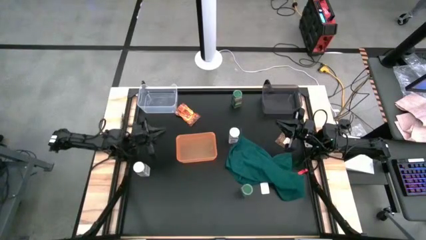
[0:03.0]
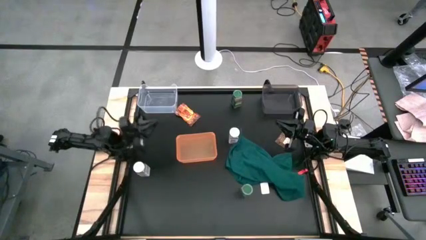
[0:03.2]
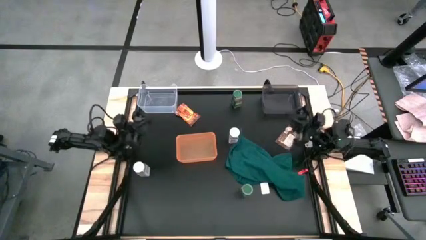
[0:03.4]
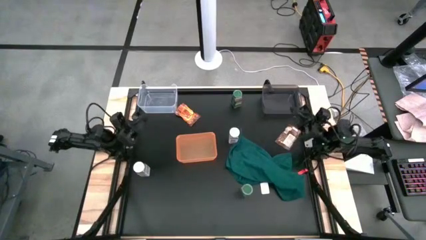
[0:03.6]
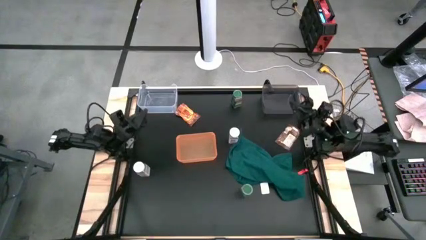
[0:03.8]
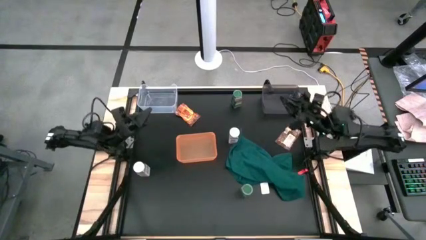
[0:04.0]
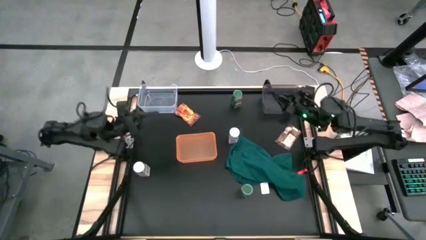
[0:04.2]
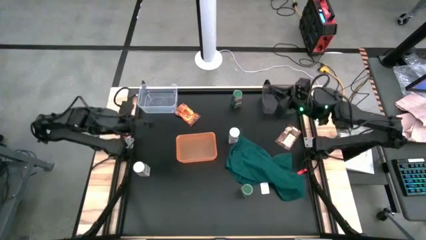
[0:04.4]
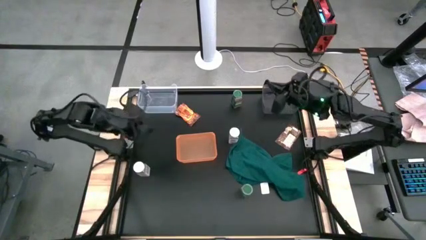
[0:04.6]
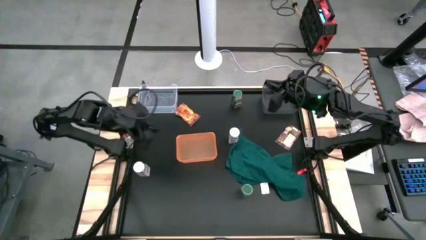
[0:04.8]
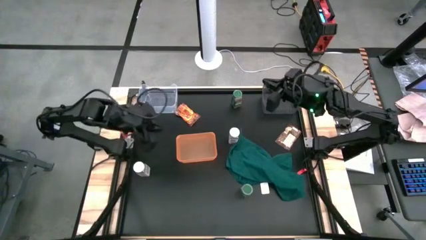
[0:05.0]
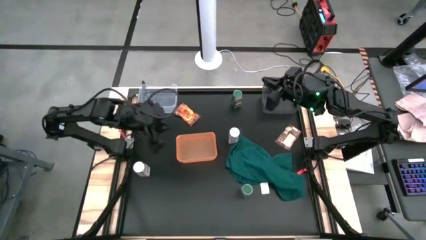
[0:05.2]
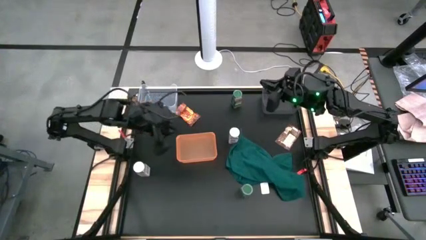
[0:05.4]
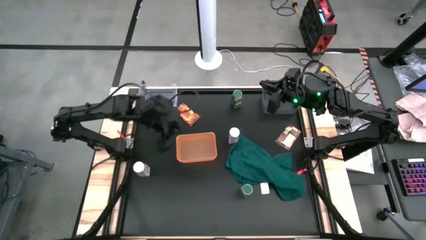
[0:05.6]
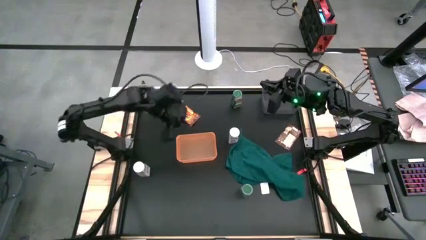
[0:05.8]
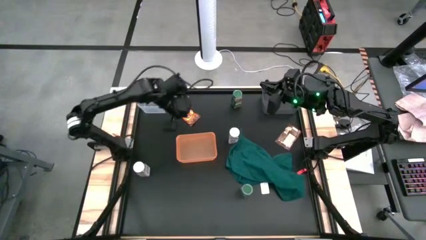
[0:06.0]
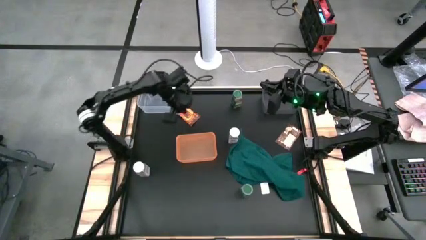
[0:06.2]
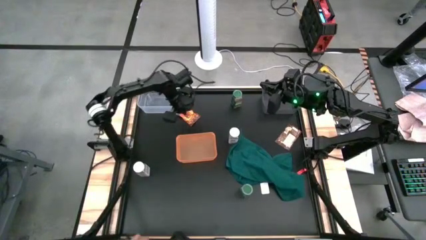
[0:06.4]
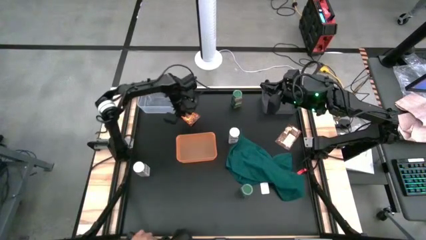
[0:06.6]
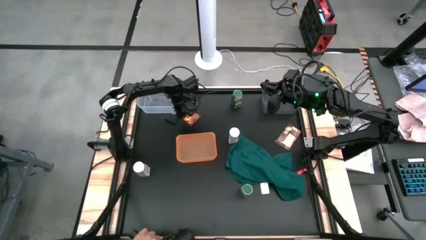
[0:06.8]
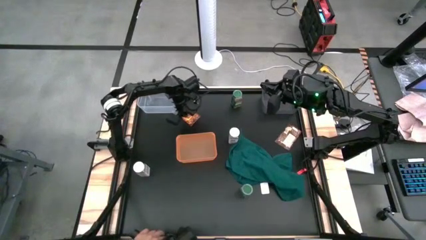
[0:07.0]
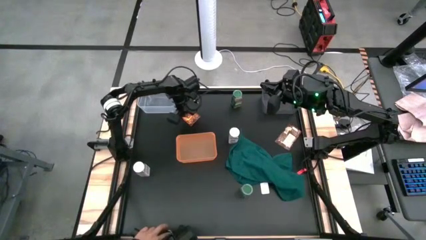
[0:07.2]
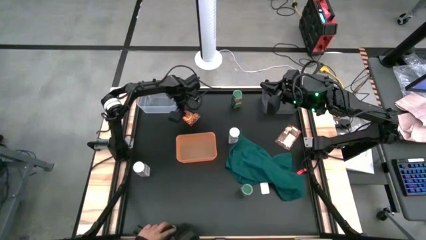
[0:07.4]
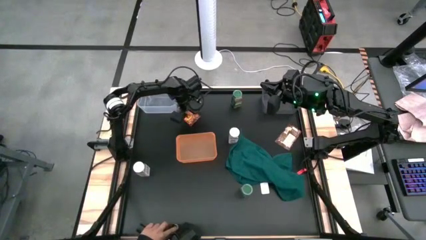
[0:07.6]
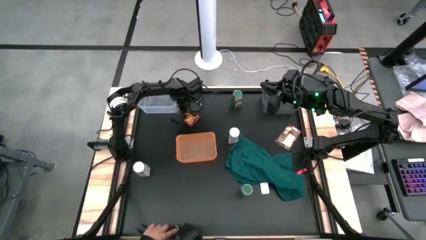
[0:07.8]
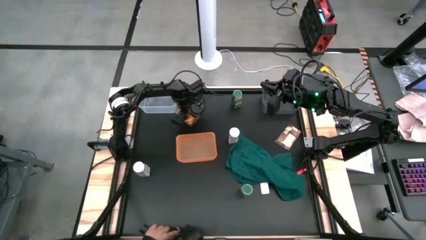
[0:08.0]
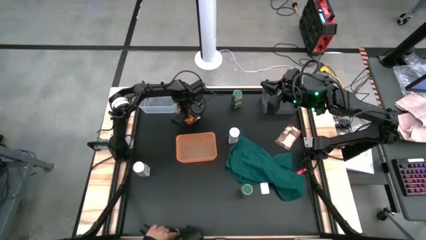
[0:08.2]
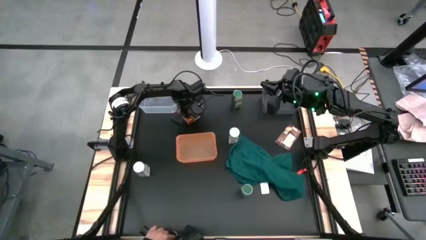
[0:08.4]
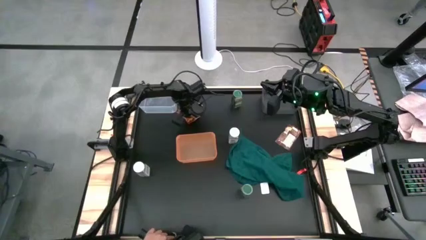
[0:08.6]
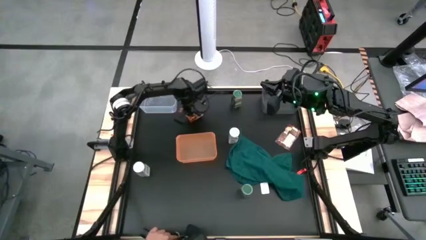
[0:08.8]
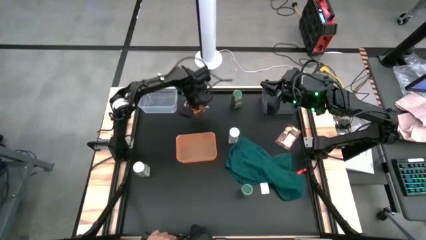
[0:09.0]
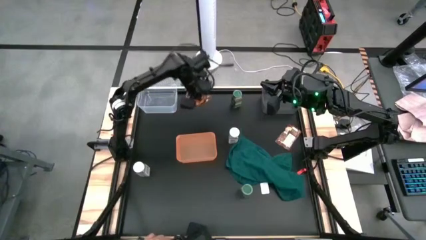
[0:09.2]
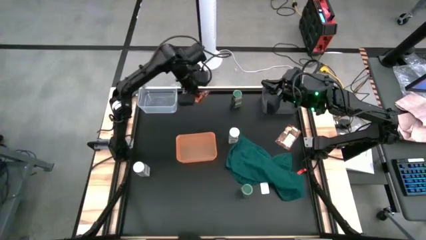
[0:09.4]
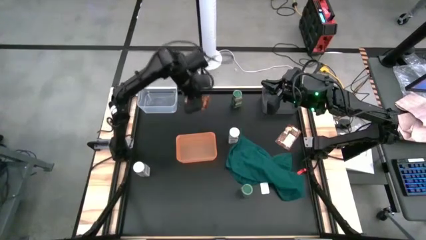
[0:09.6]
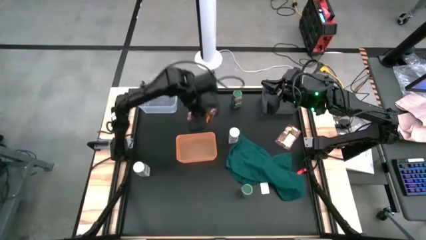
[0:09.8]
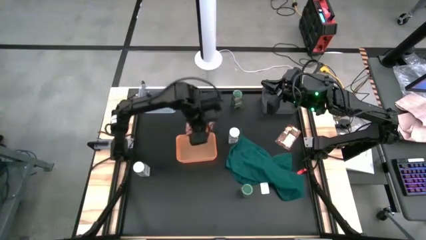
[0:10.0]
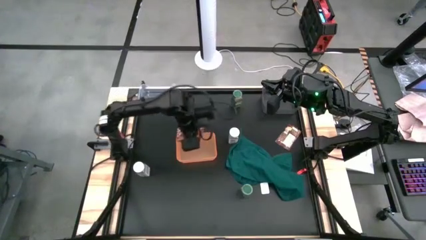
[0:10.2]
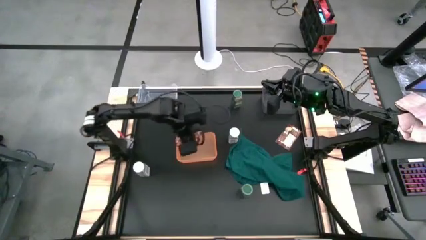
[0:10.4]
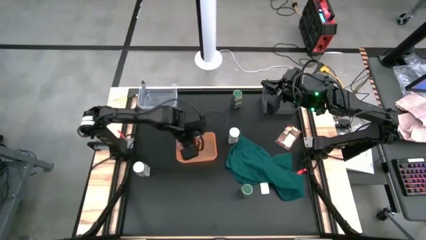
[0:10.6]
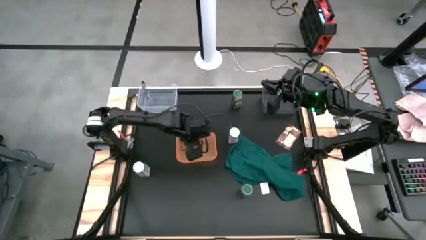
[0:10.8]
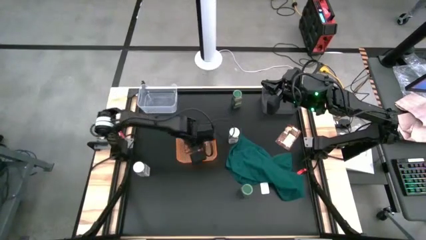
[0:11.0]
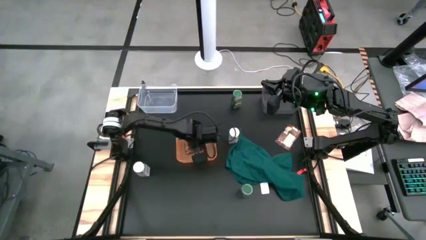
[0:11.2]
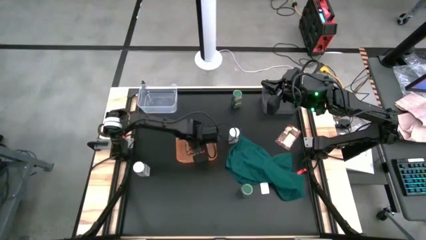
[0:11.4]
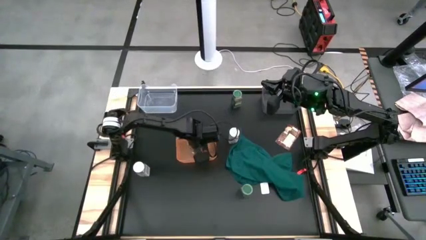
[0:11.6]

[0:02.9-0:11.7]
Task: Sort spices by type
Put the left orange seasoning pack into the orange bin

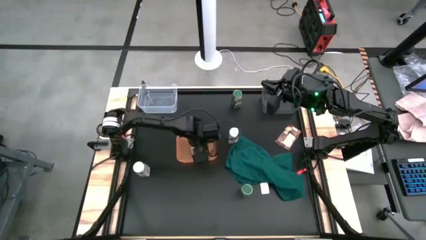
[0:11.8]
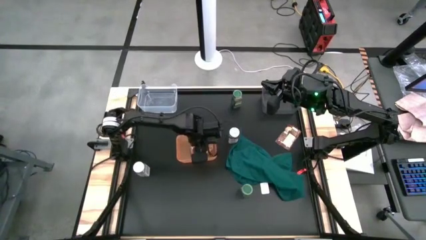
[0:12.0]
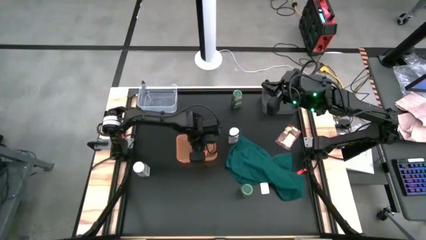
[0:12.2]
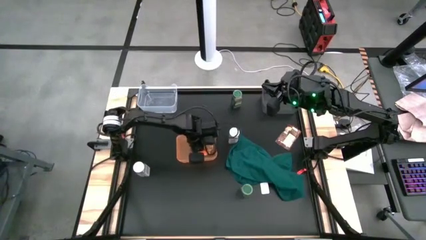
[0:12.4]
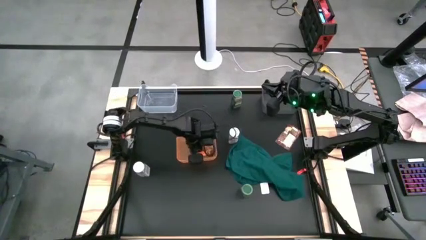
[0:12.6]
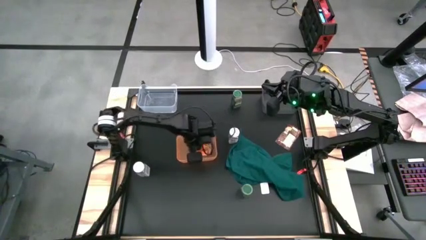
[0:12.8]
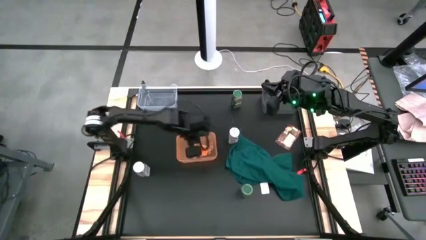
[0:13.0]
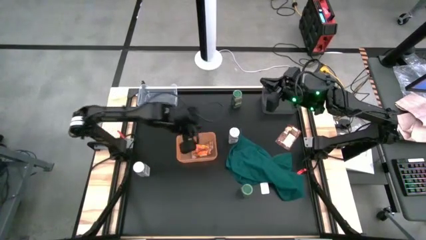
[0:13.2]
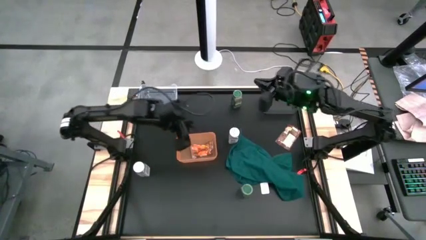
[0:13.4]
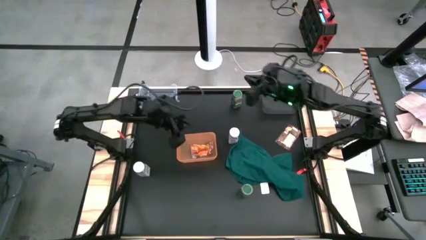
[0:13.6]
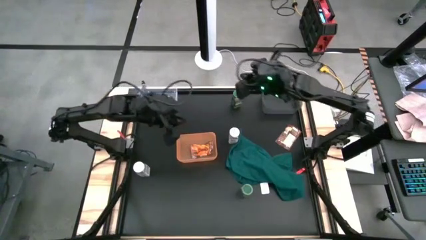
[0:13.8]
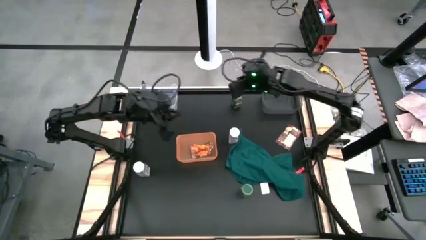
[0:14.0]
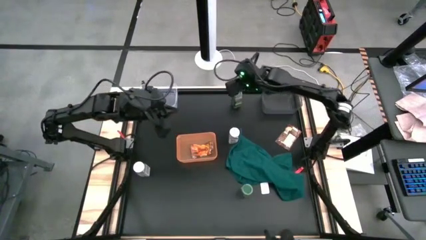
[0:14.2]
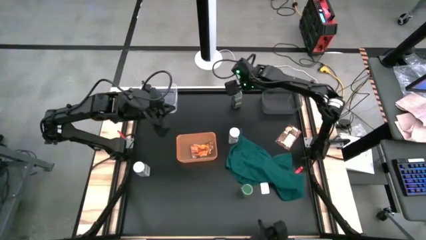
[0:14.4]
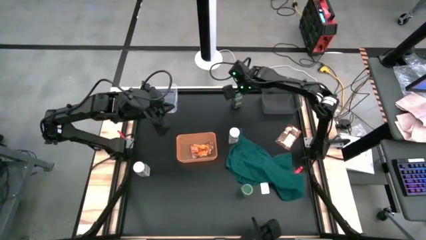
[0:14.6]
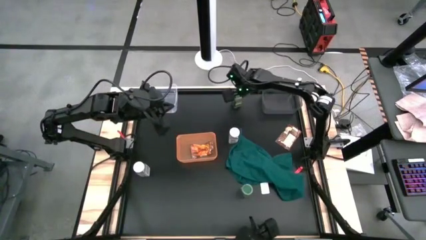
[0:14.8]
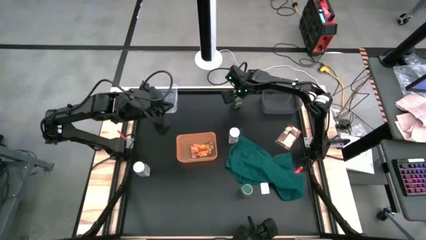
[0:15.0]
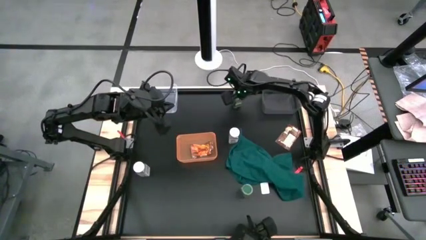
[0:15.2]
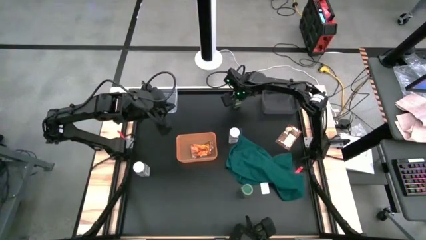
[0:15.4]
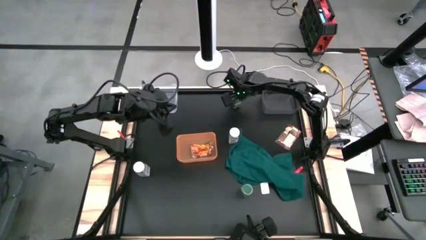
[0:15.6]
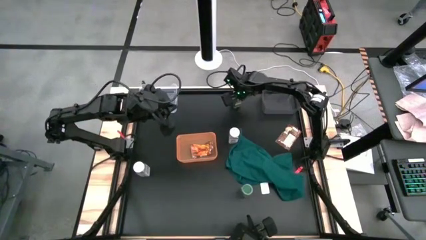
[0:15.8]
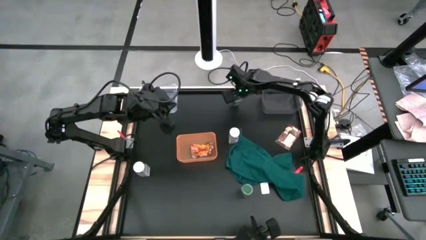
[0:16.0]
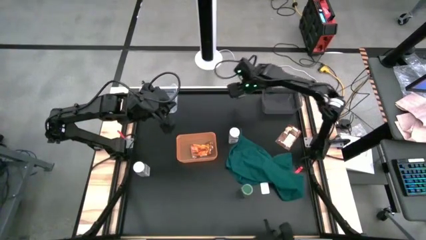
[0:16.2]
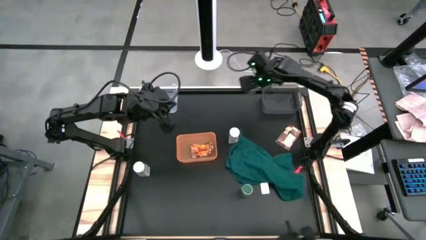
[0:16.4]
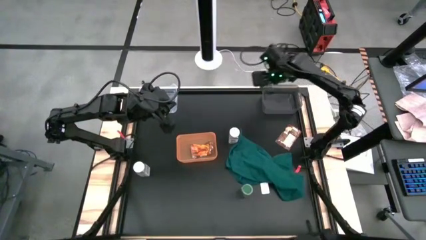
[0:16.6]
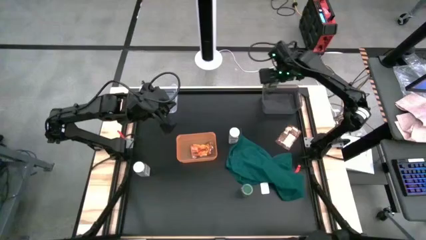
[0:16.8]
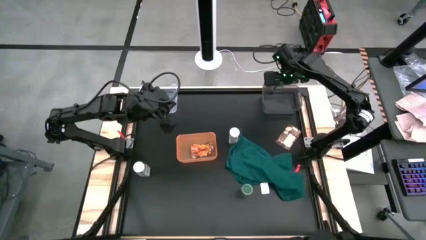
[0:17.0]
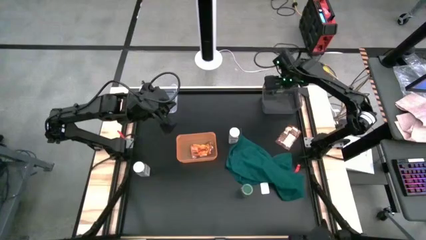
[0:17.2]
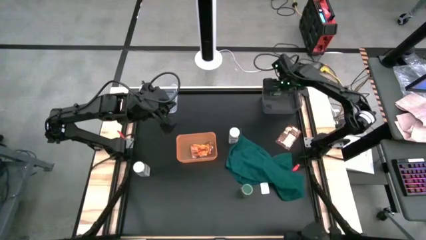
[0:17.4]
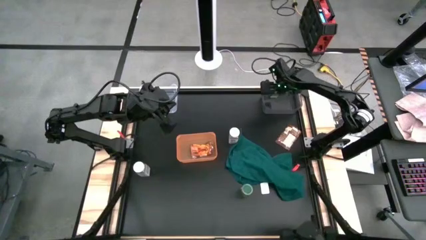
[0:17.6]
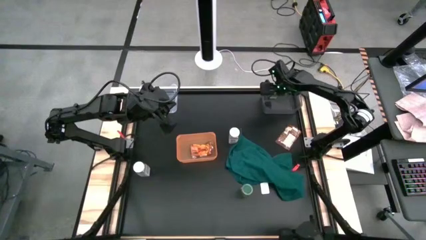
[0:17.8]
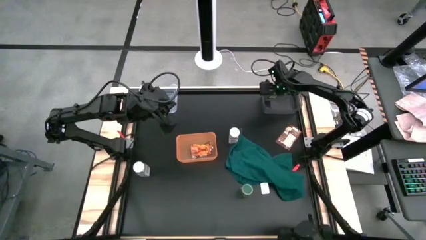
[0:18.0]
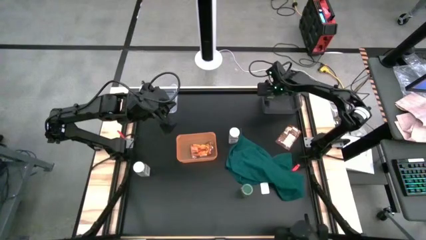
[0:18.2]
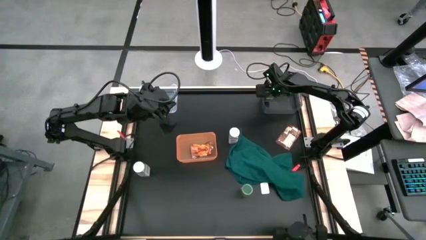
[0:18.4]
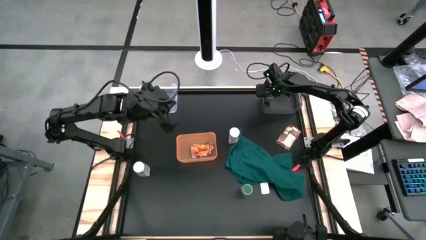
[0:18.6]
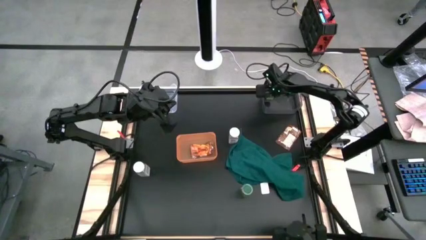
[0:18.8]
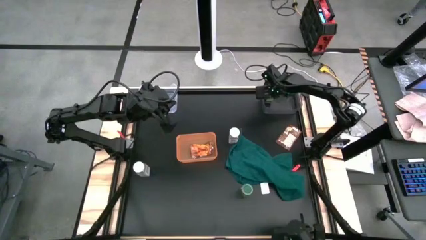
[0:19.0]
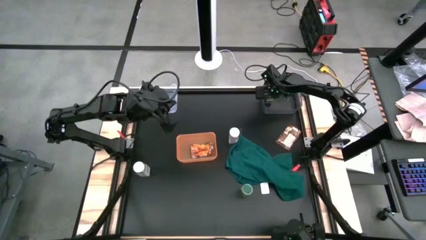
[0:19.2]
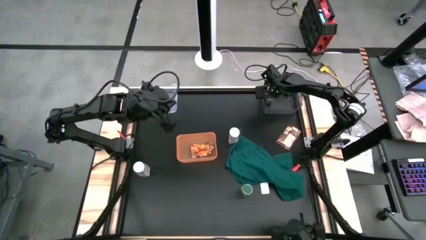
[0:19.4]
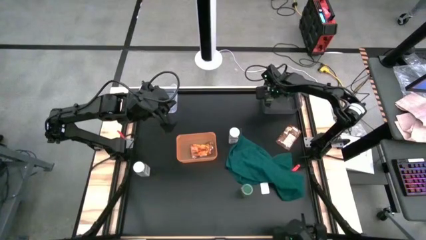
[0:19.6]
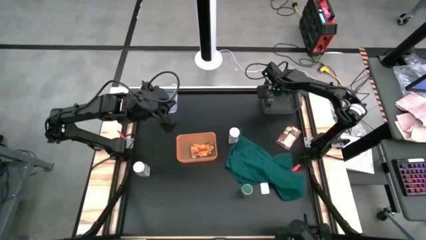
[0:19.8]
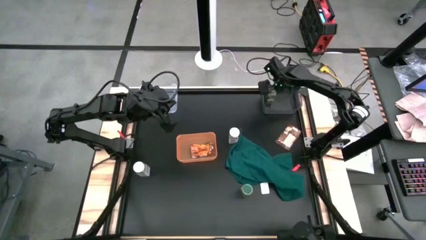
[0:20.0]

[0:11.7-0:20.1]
Put the top green seasoning bottle into the black bin
